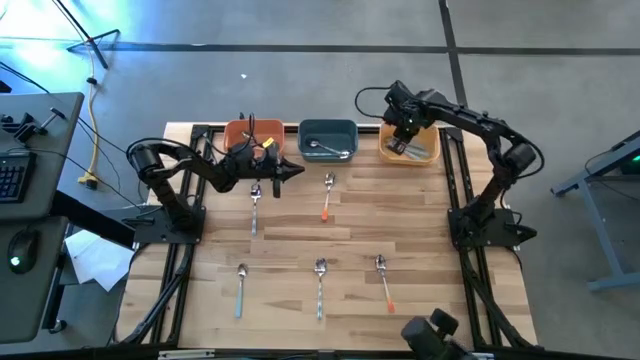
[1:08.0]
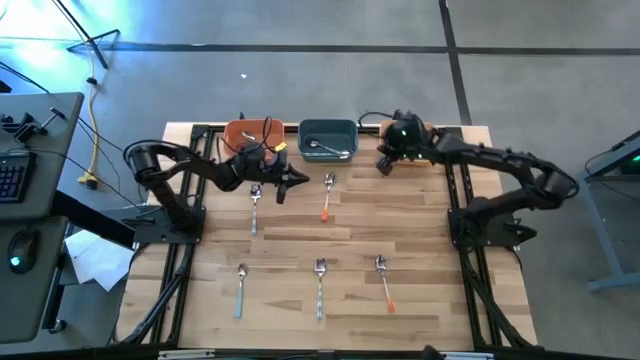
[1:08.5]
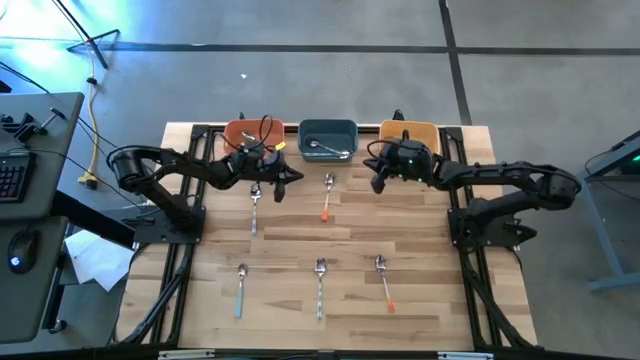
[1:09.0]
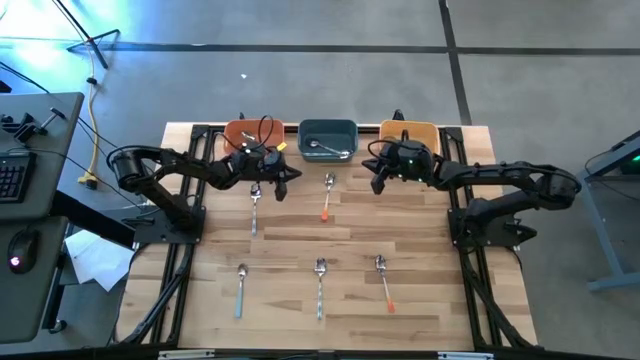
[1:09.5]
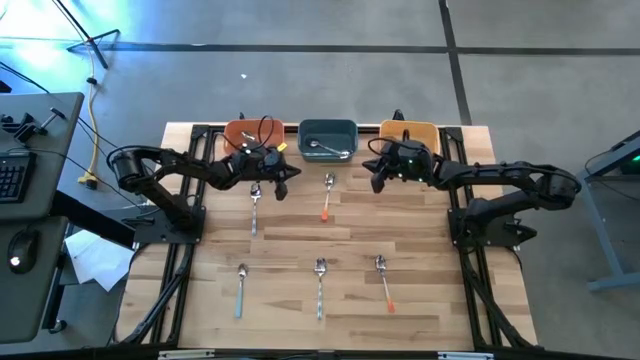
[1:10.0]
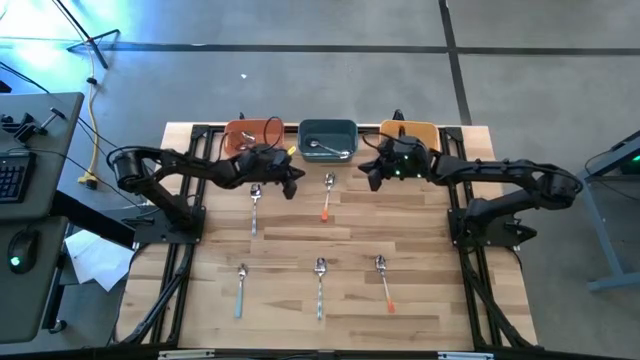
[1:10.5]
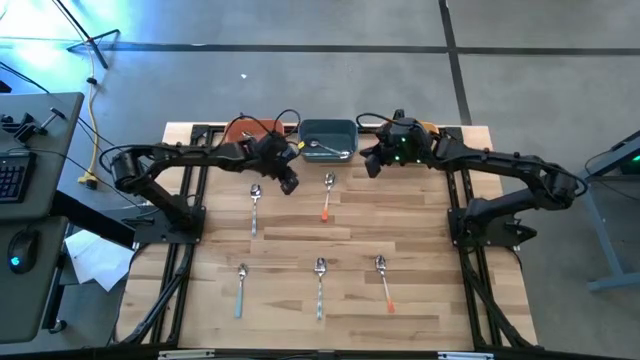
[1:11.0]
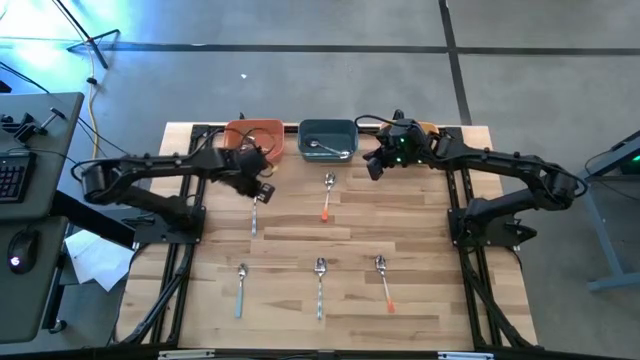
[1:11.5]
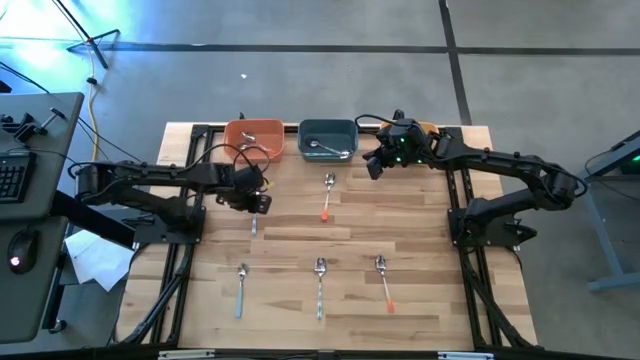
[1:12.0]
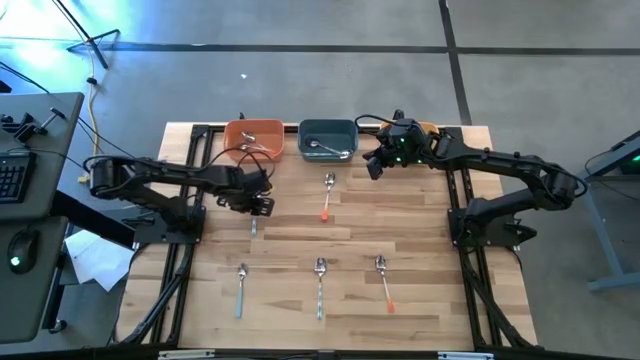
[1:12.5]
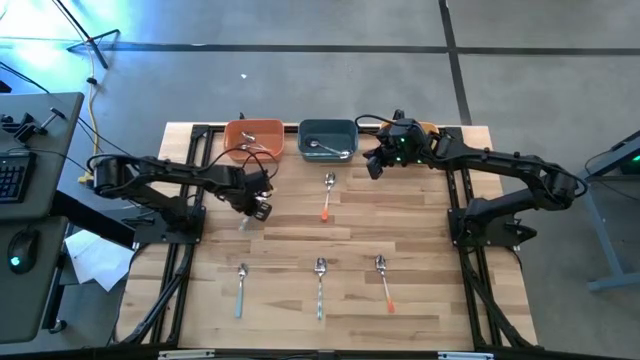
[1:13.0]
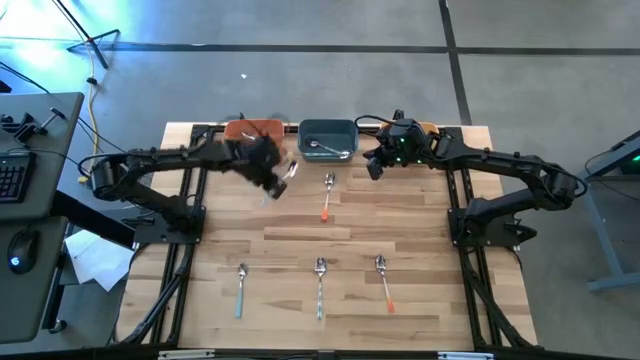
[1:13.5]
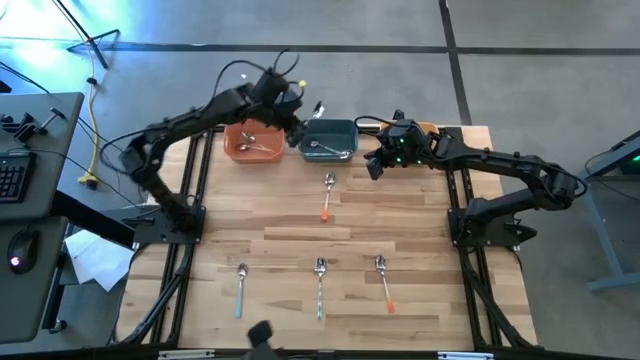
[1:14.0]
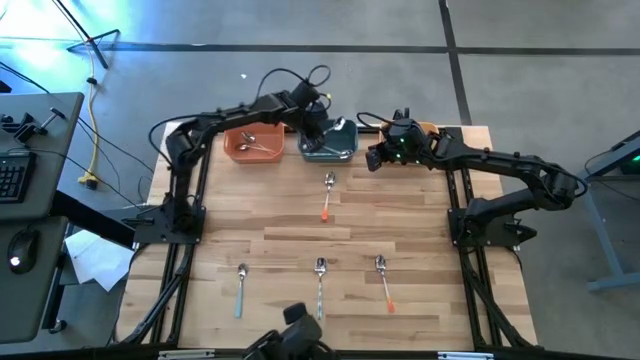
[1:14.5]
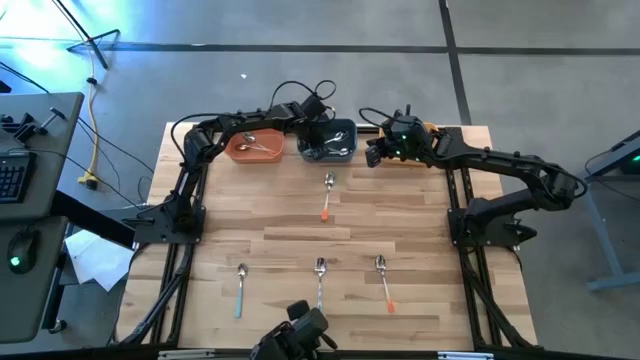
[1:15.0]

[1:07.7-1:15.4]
Task: Sort silverware by color (type)
Put the white spoon into the blue bin

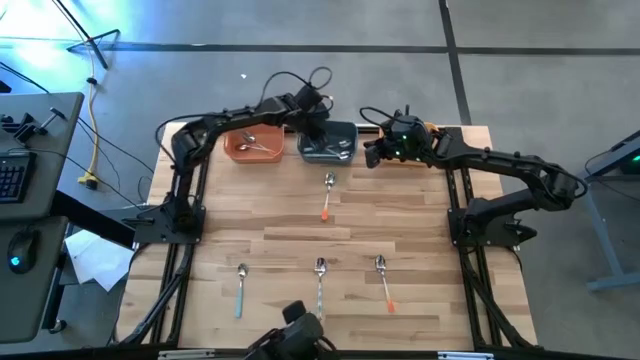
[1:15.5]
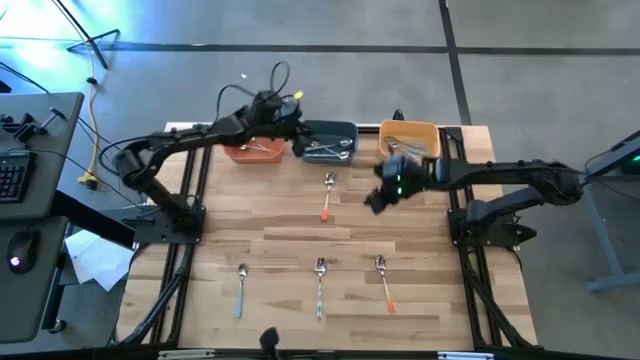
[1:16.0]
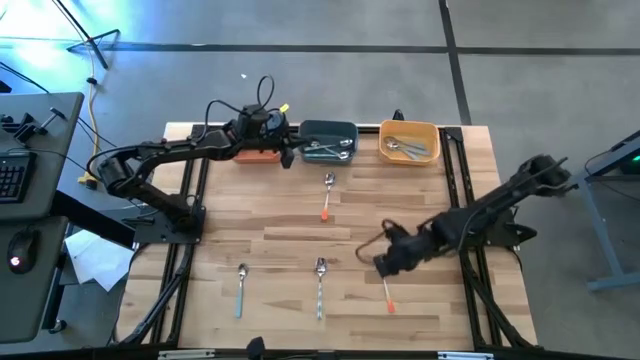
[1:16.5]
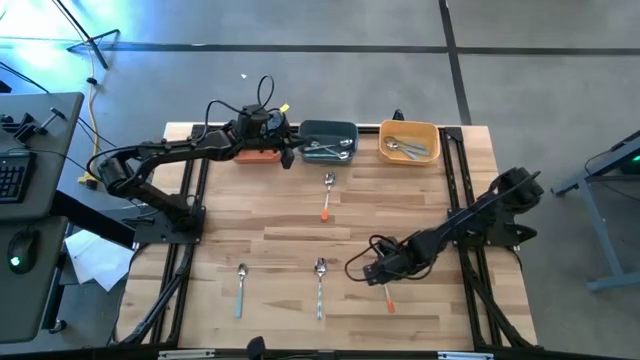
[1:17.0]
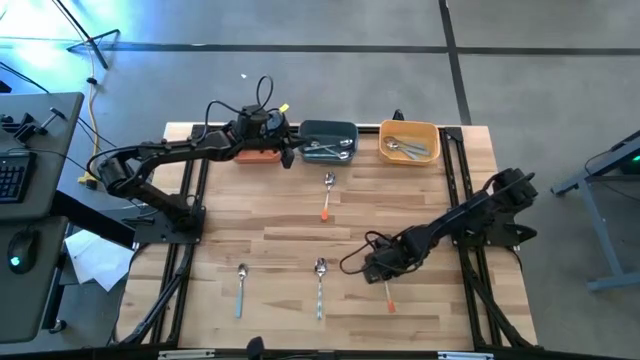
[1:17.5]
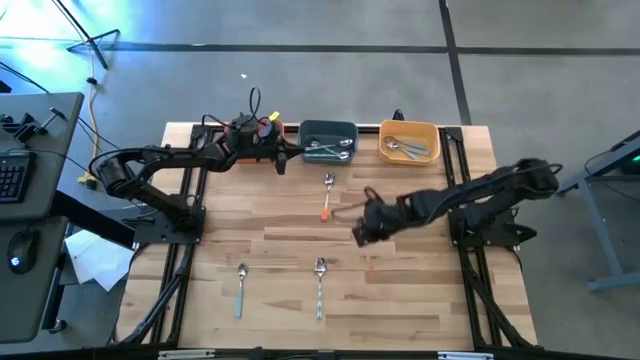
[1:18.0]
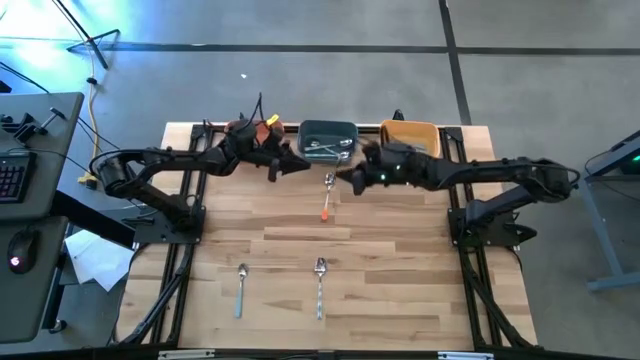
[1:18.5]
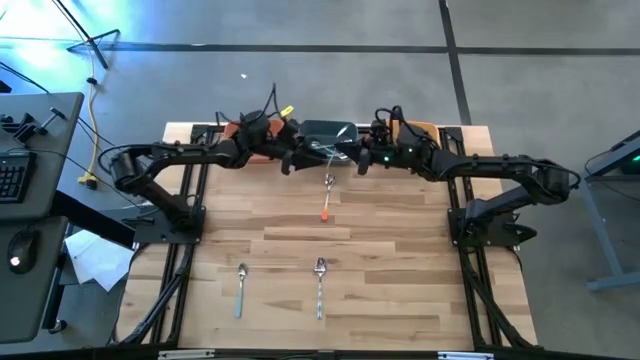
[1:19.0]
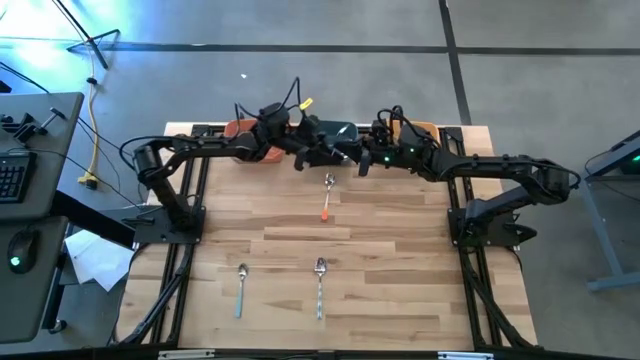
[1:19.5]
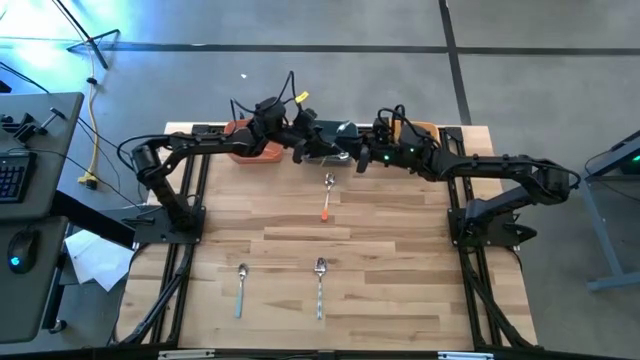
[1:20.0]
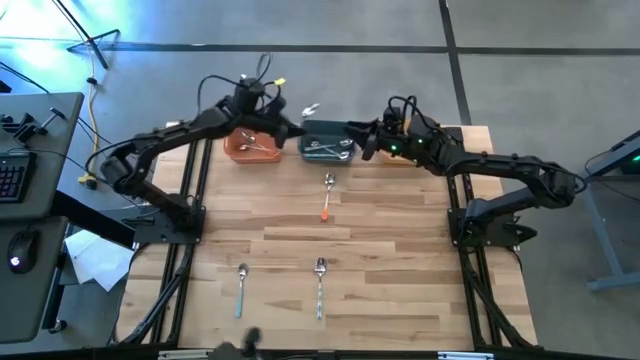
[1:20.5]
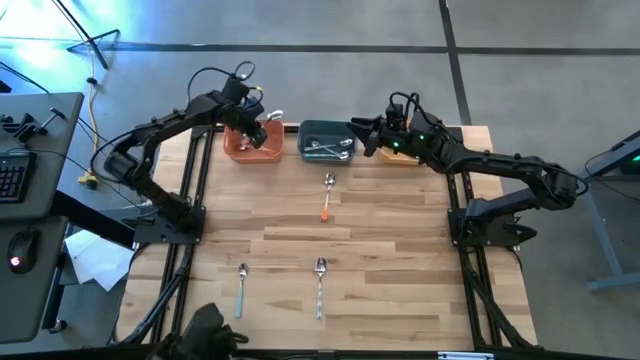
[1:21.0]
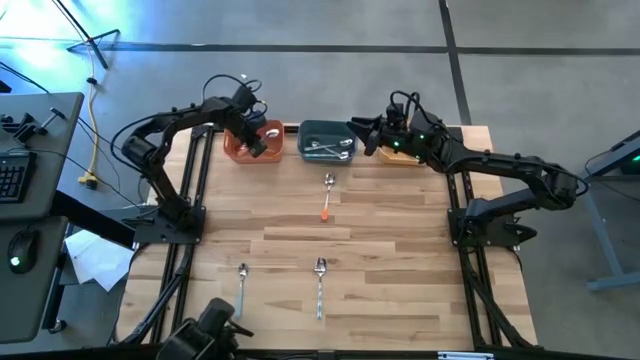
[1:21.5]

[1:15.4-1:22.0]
Put the orange spoon into the orange bin

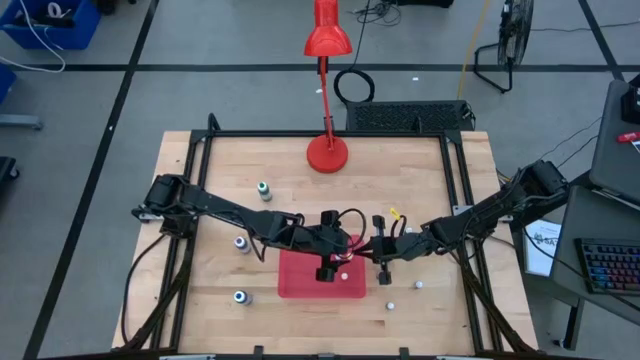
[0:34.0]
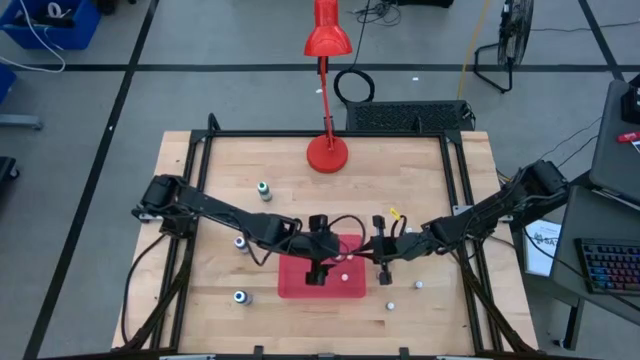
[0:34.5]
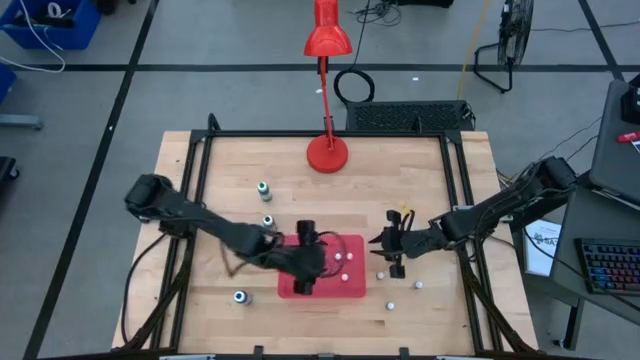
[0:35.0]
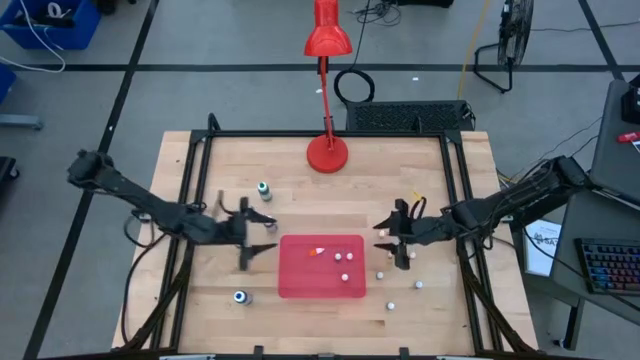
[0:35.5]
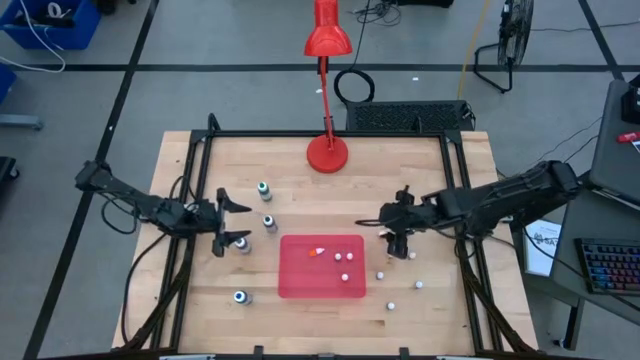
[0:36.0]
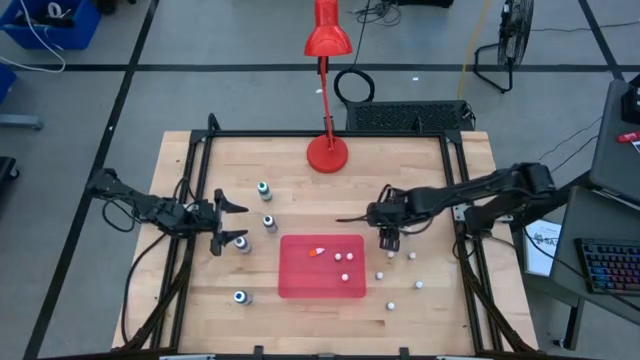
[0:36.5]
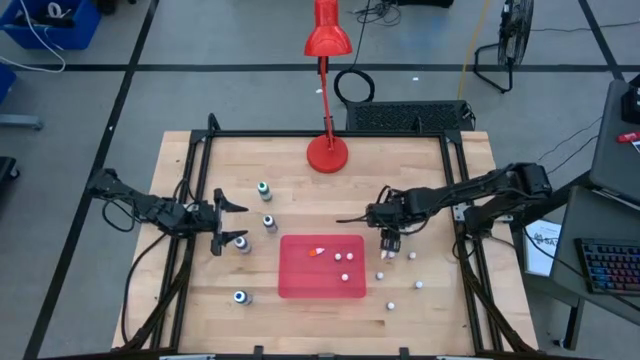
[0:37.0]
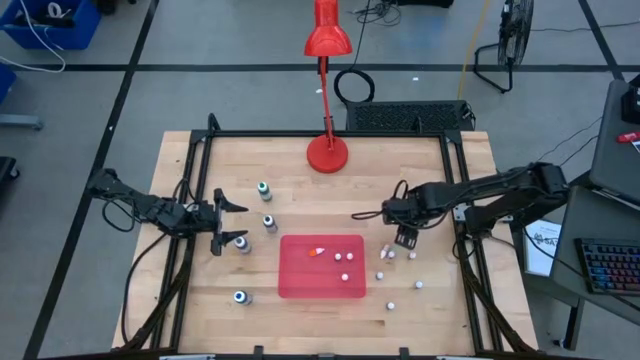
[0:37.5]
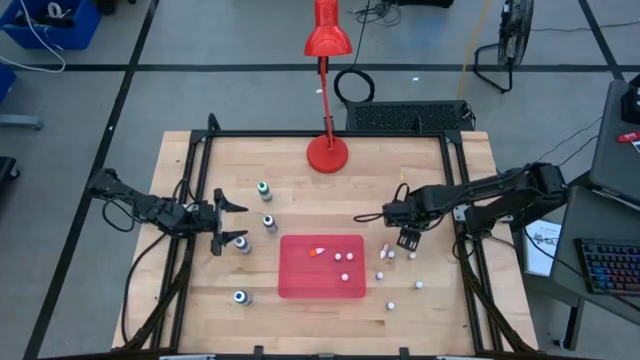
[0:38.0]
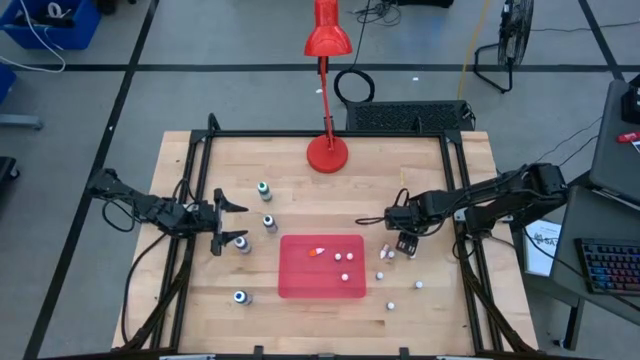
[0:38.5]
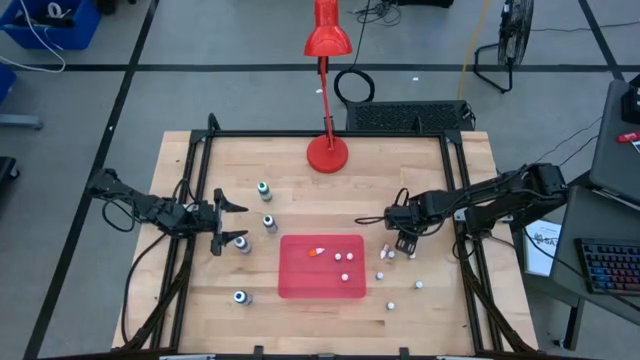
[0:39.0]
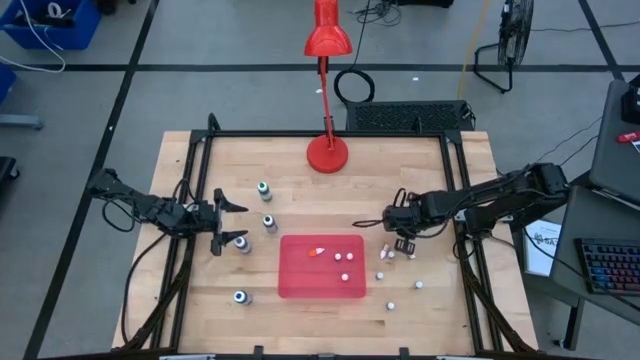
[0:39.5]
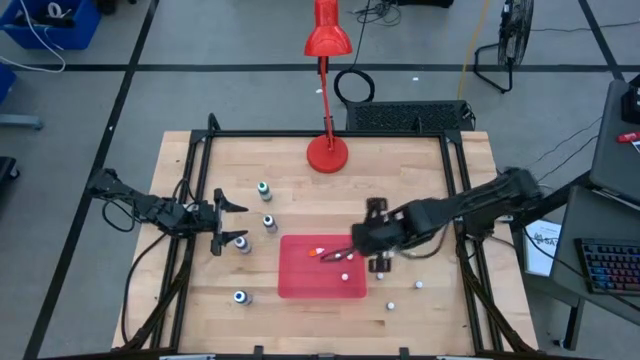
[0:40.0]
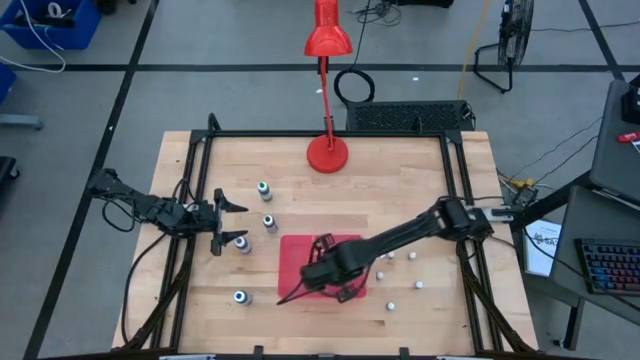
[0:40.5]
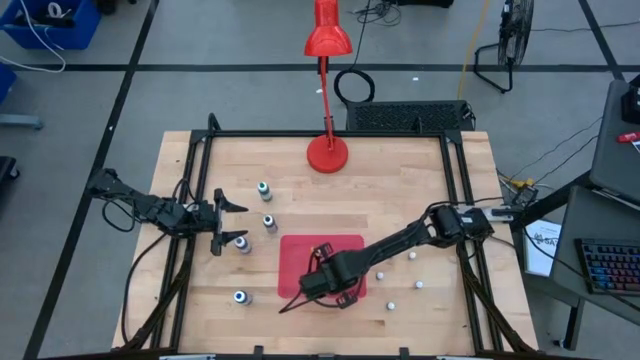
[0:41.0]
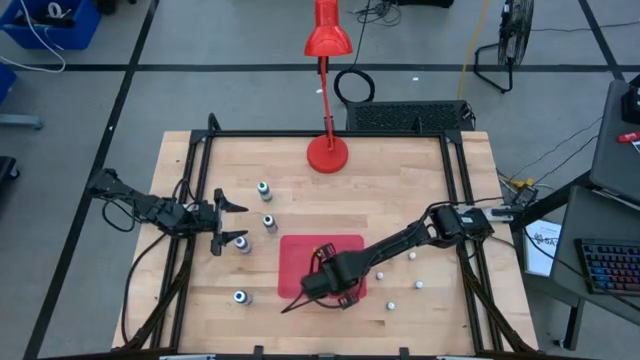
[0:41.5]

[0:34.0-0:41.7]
Task: Pick & Place food coloring
Put the small purple food coloring bottle into the pink container
